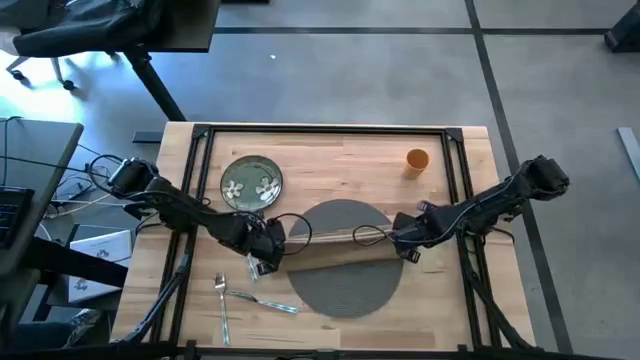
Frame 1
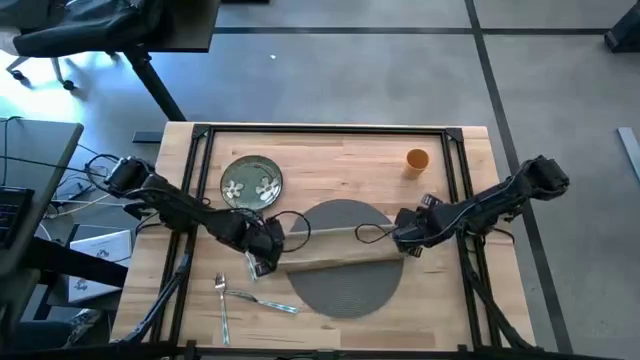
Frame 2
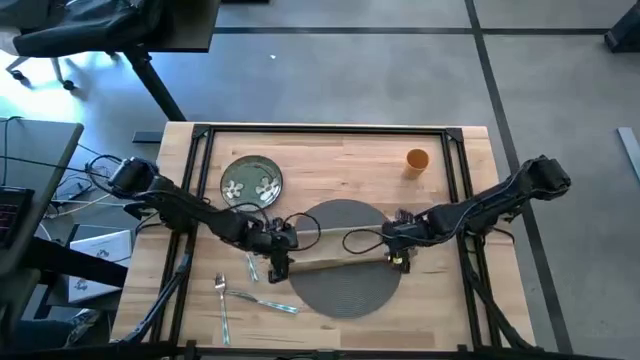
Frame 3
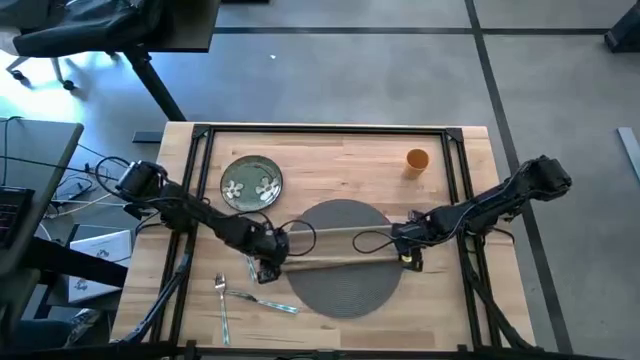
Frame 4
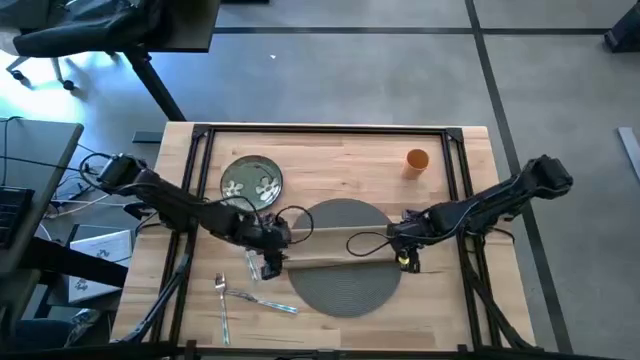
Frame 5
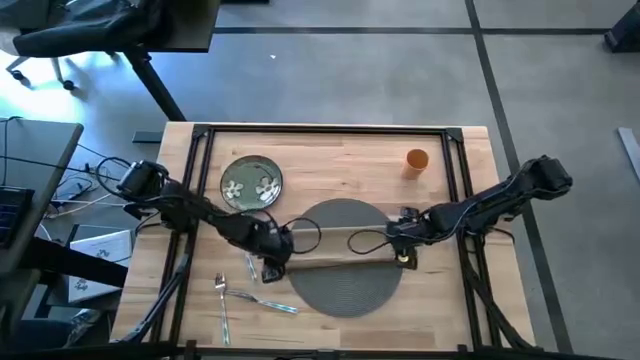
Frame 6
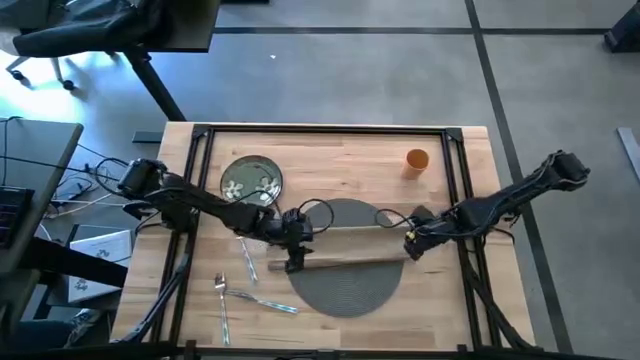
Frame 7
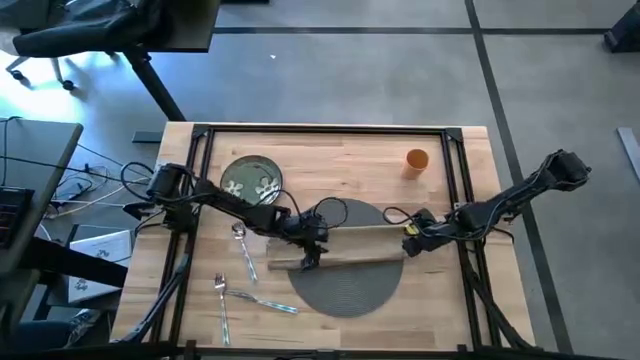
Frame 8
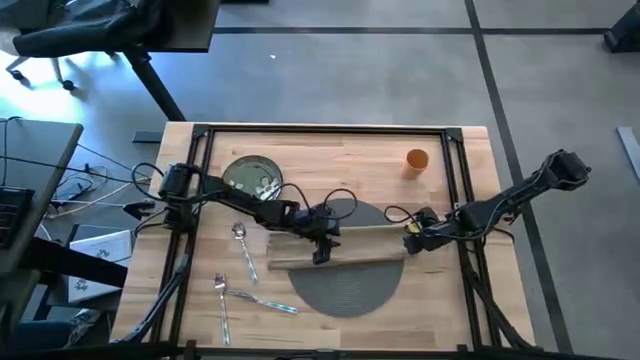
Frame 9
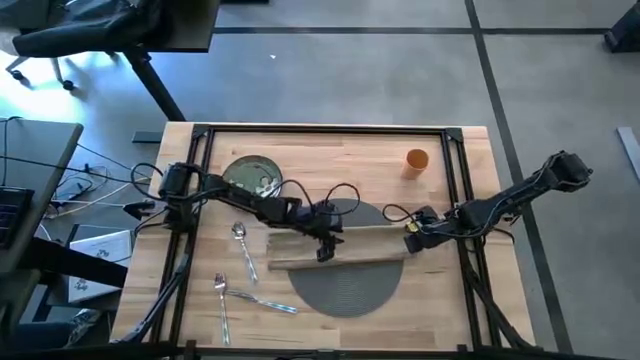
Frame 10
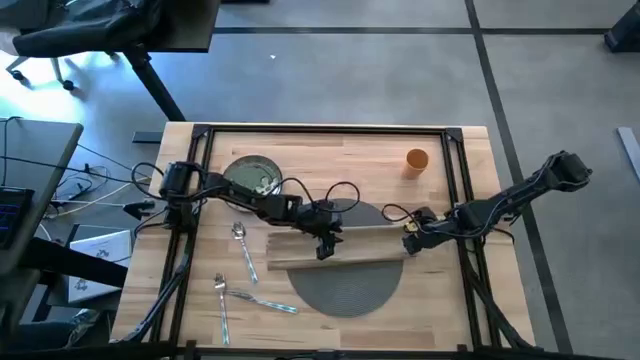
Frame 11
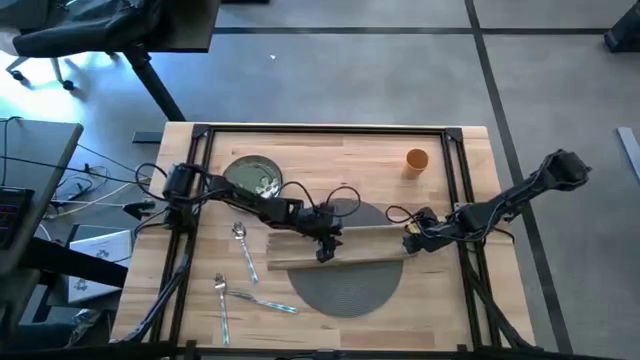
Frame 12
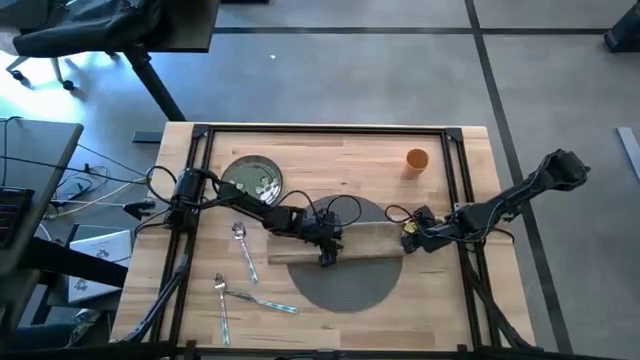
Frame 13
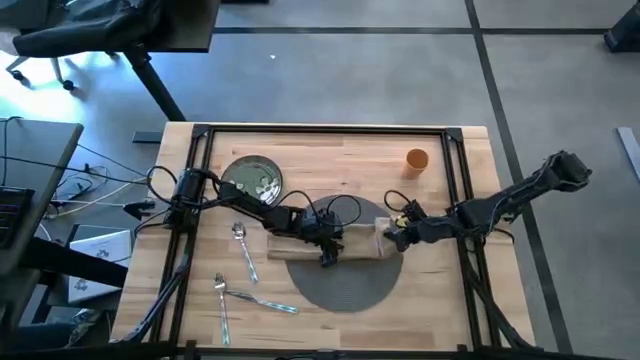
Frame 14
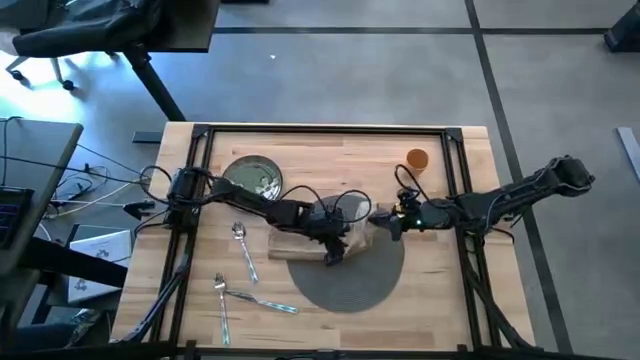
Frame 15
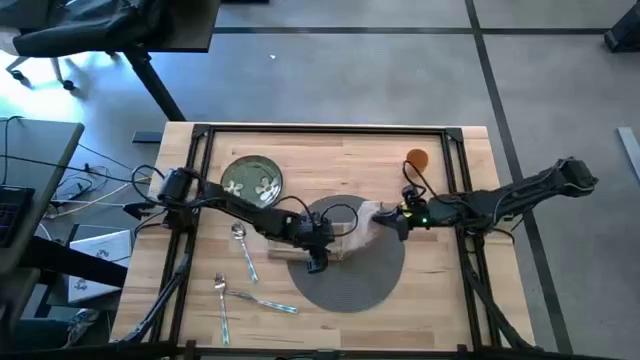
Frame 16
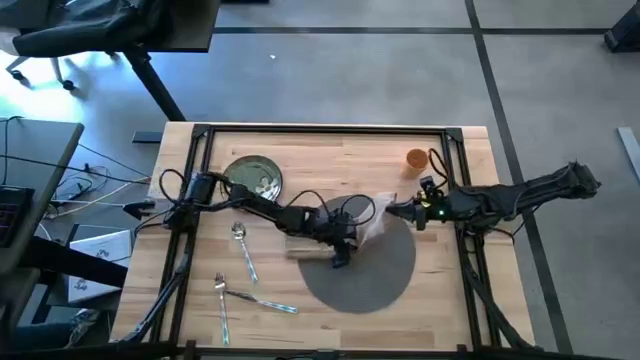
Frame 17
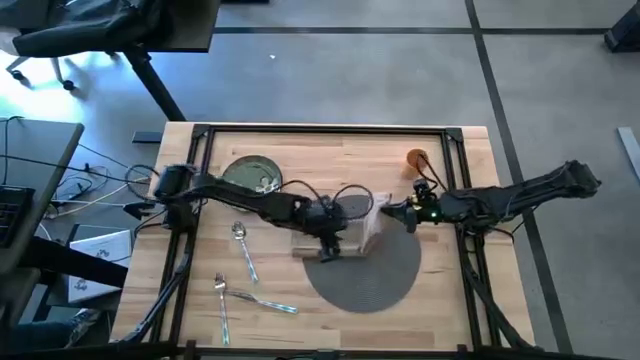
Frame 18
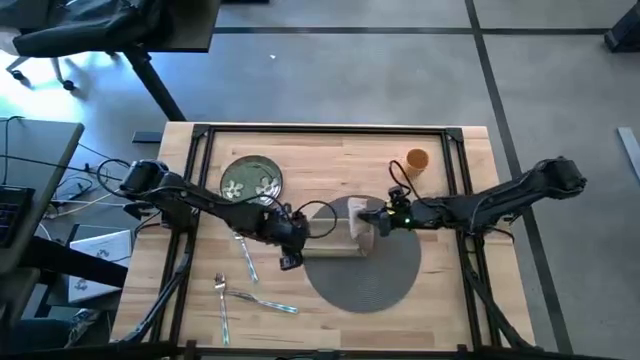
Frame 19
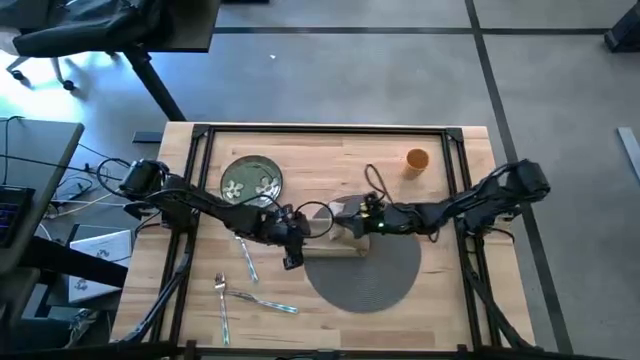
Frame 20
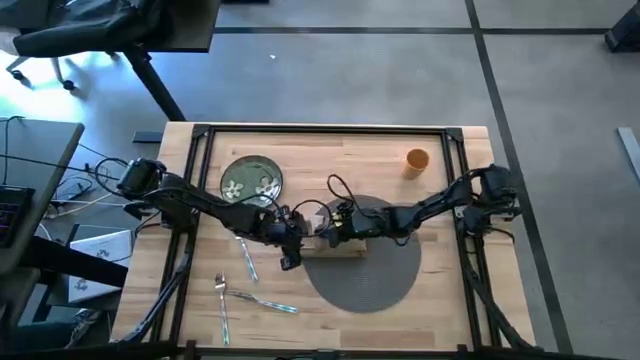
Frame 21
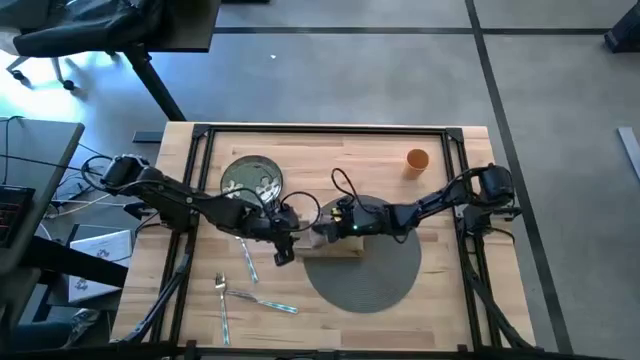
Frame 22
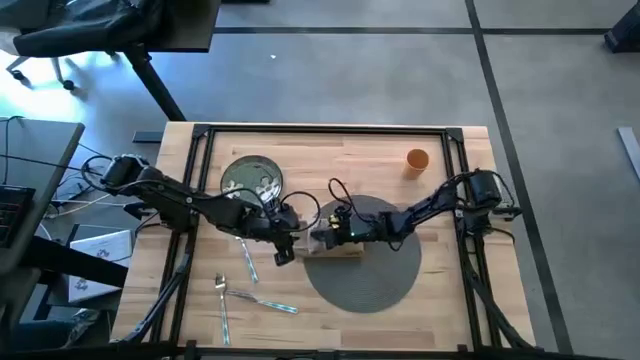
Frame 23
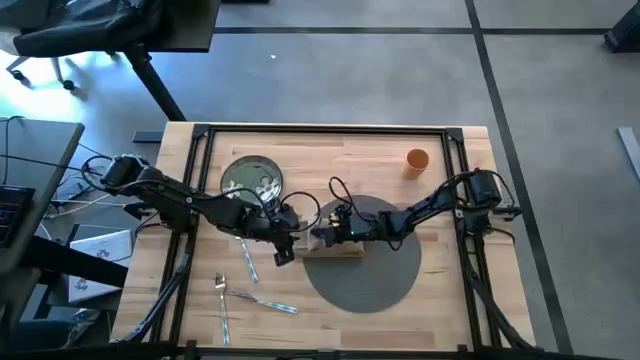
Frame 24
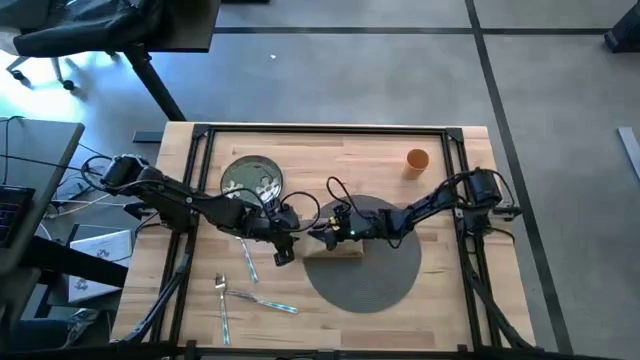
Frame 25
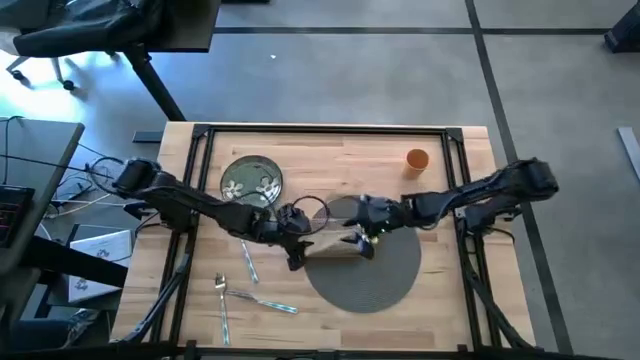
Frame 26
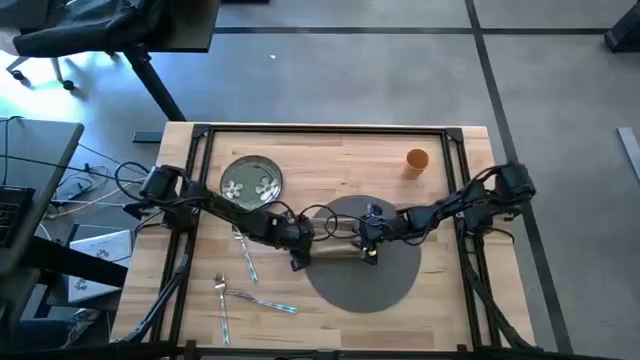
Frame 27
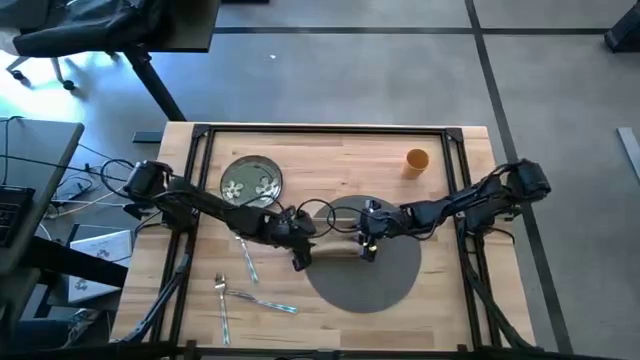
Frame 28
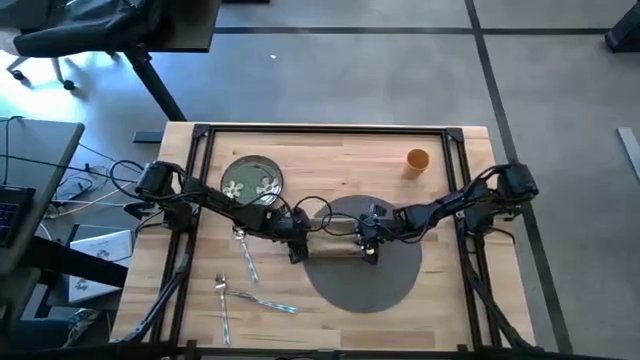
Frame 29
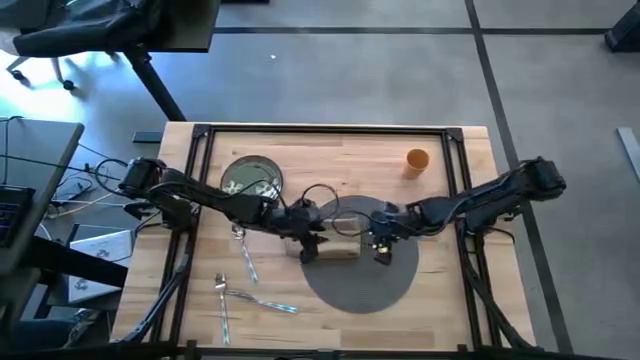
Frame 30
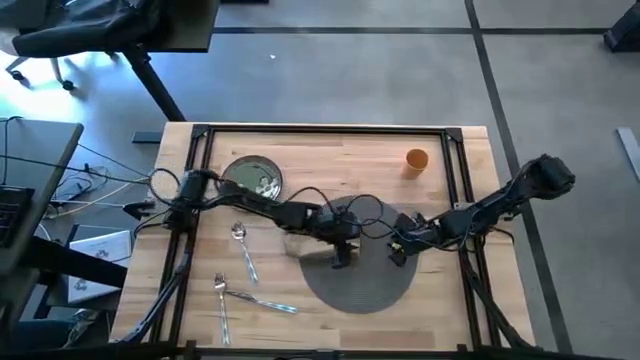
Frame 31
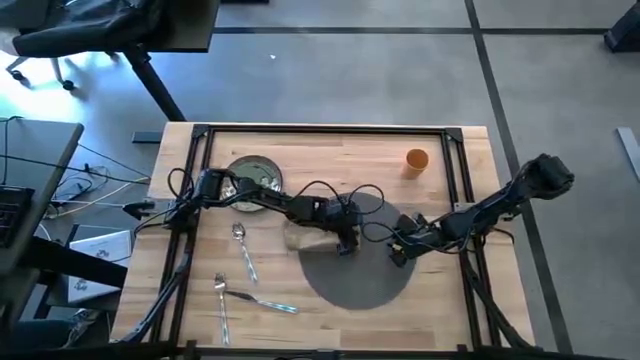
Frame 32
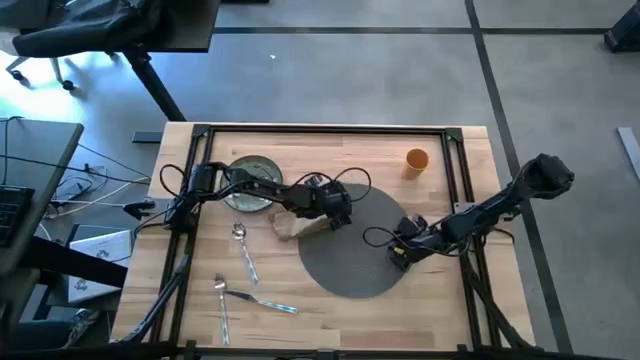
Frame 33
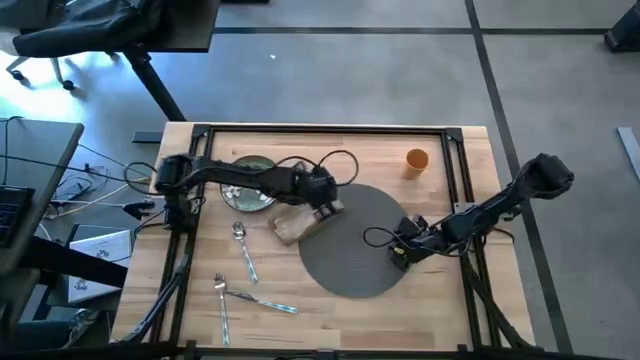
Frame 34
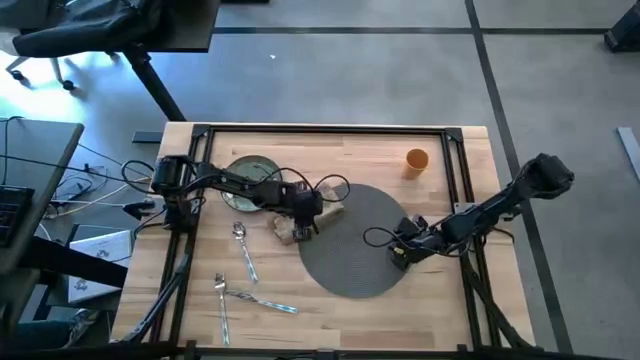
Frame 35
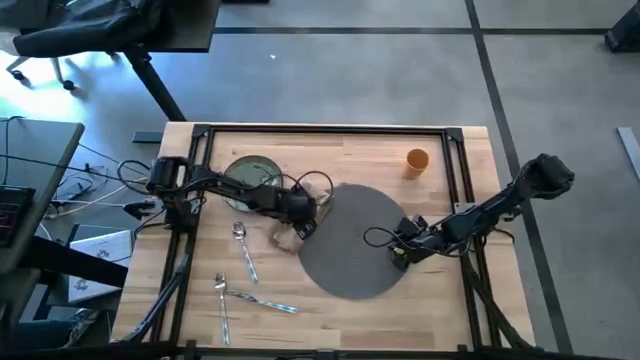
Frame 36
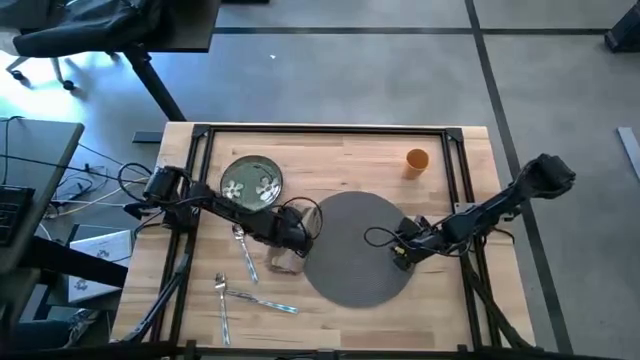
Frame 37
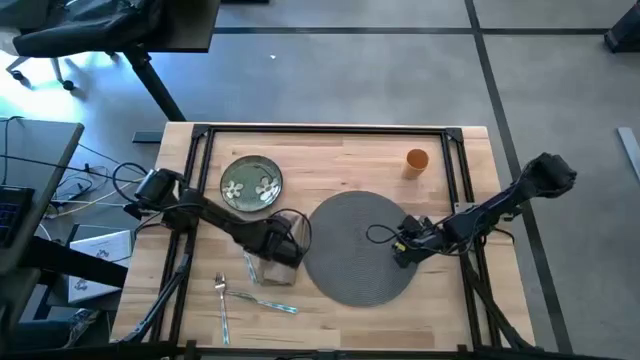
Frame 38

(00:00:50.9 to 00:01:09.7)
Task: Set table place
Fold the brown table napkin

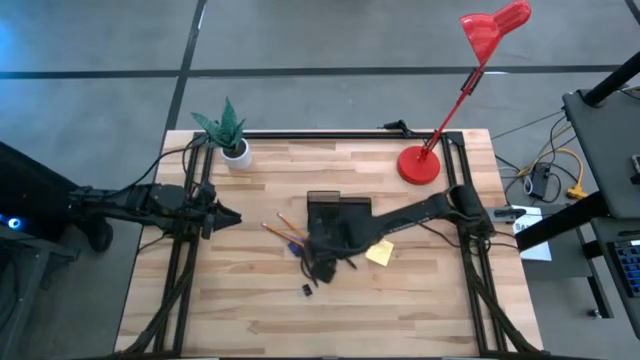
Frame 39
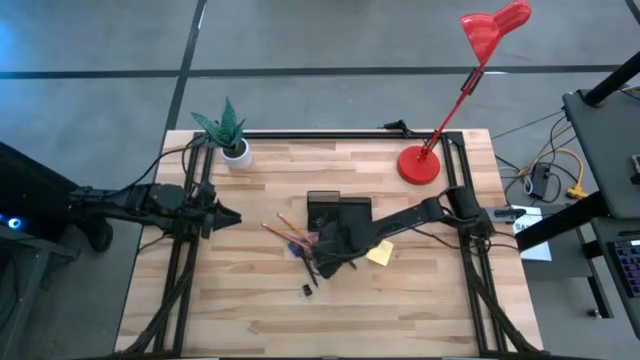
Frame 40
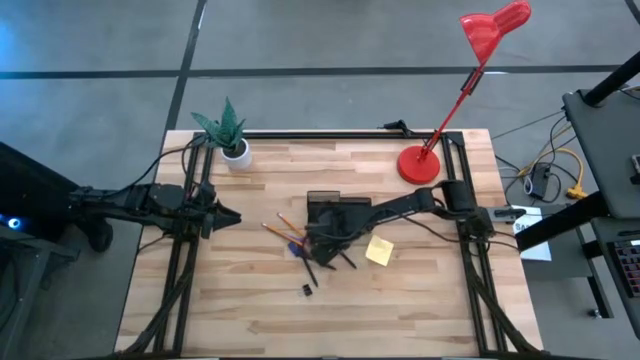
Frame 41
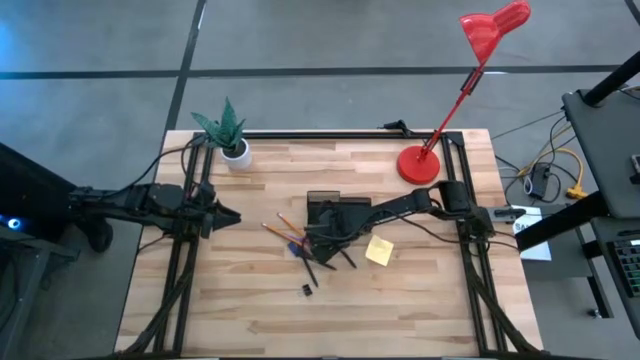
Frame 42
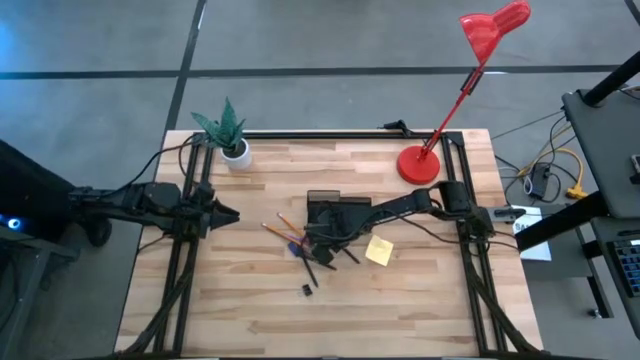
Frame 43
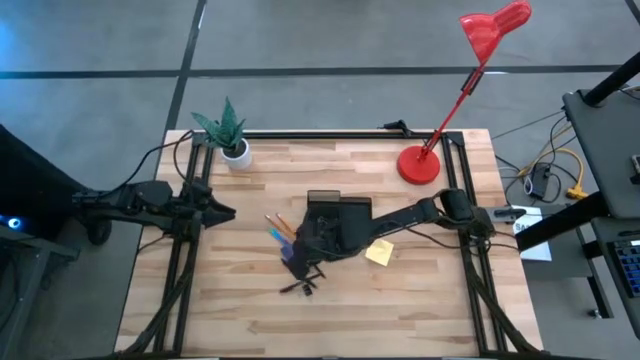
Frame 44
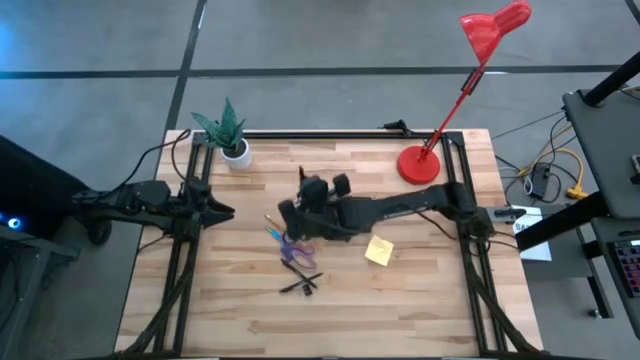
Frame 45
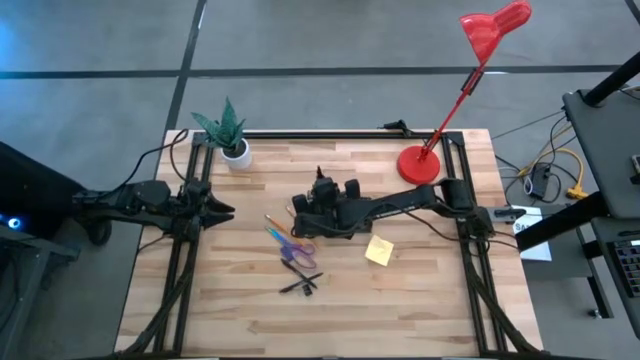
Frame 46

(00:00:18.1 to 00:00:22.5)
Task: Pick and place office supplies into organizer
Put the top black pen into the desk organizer
